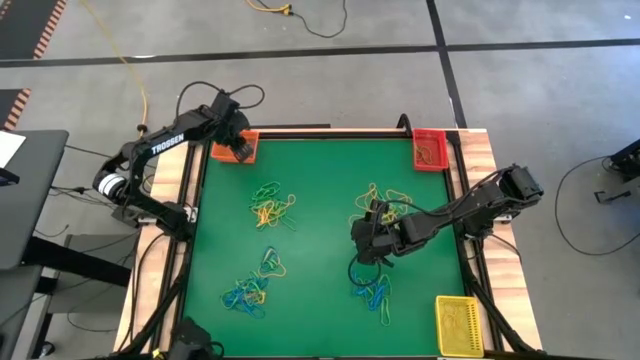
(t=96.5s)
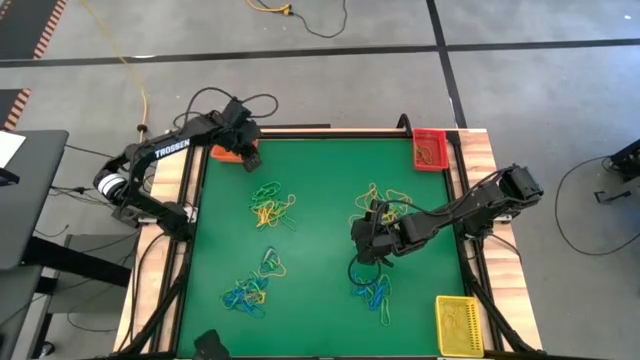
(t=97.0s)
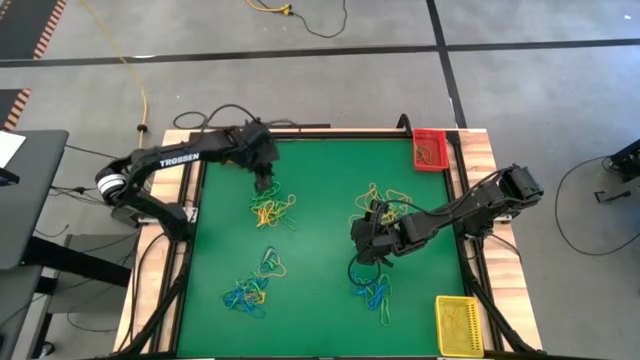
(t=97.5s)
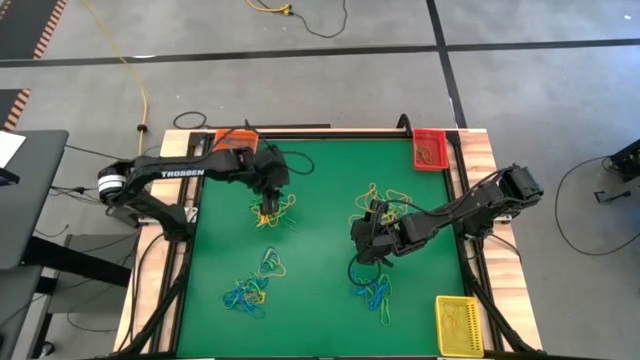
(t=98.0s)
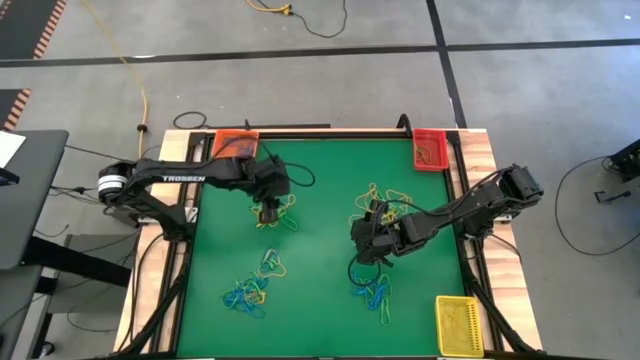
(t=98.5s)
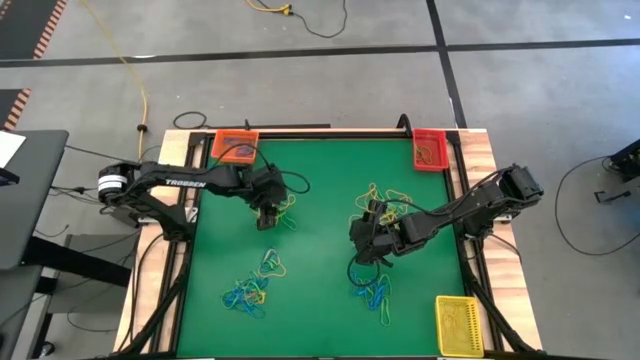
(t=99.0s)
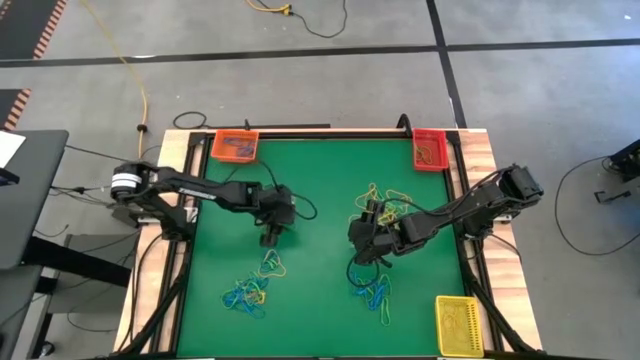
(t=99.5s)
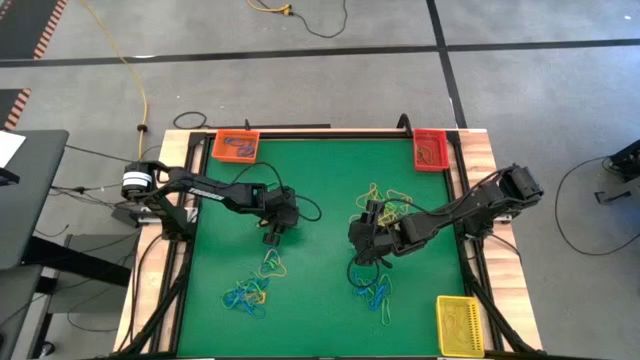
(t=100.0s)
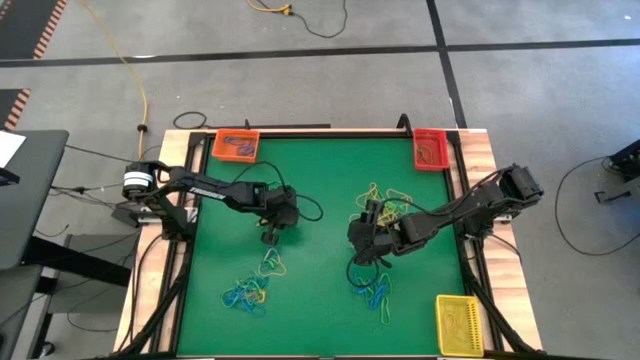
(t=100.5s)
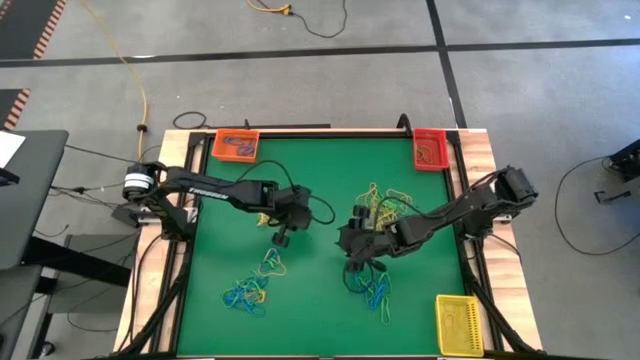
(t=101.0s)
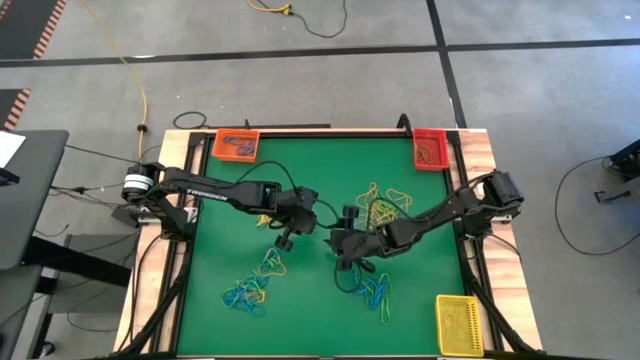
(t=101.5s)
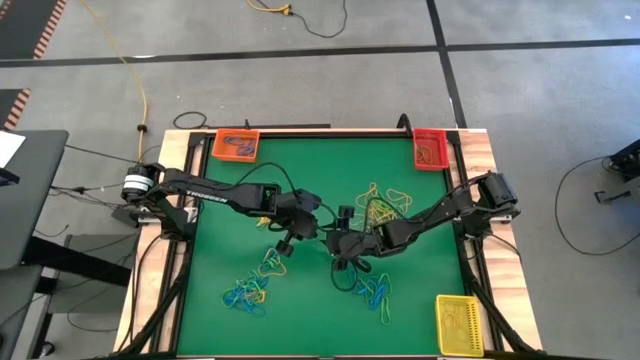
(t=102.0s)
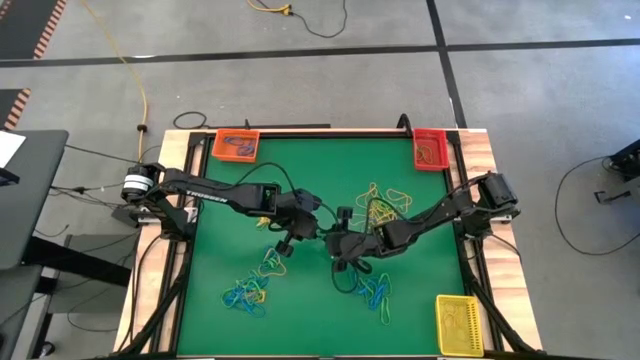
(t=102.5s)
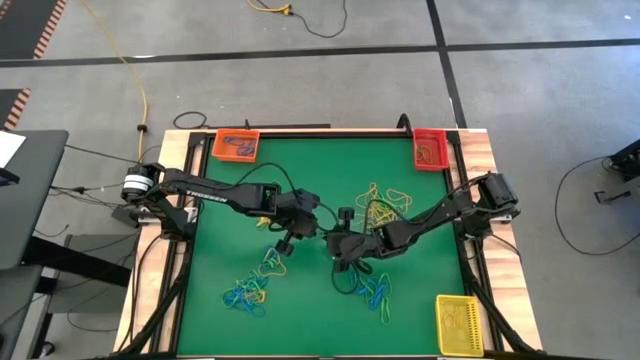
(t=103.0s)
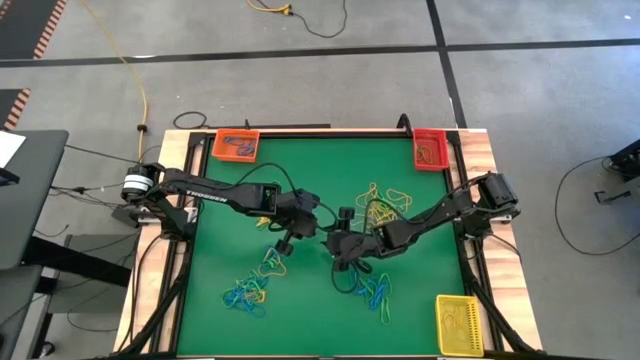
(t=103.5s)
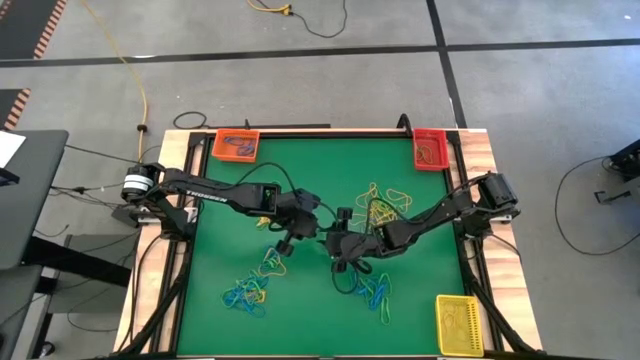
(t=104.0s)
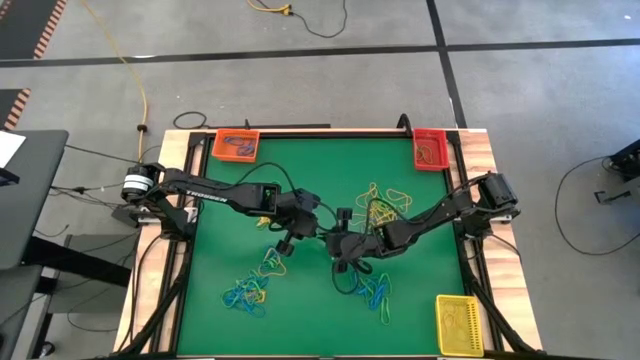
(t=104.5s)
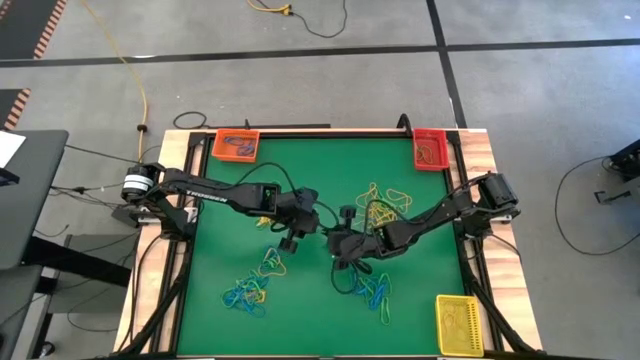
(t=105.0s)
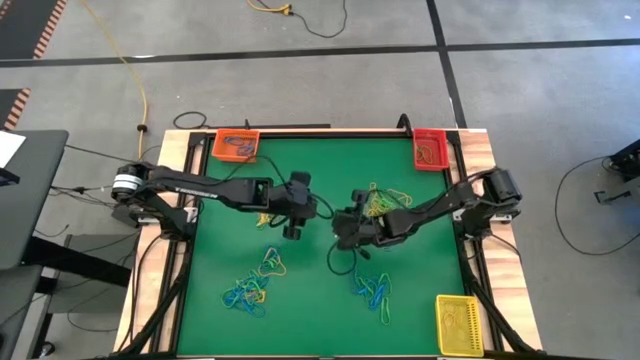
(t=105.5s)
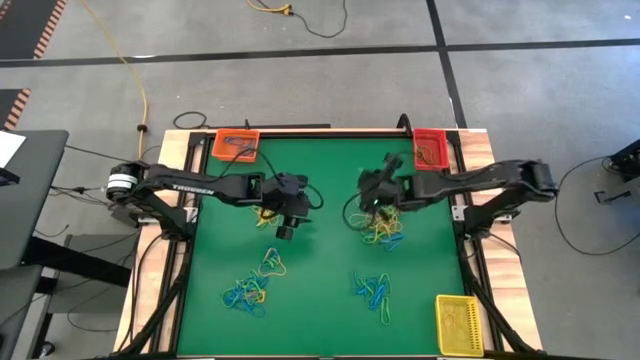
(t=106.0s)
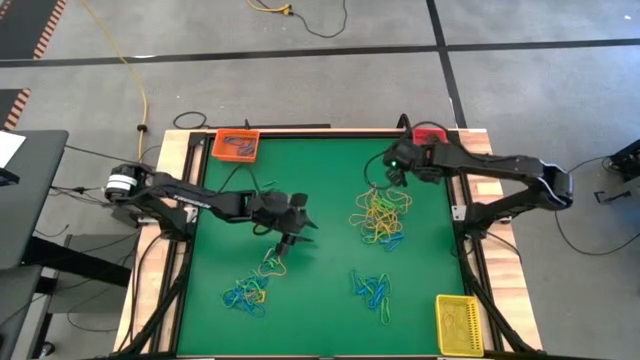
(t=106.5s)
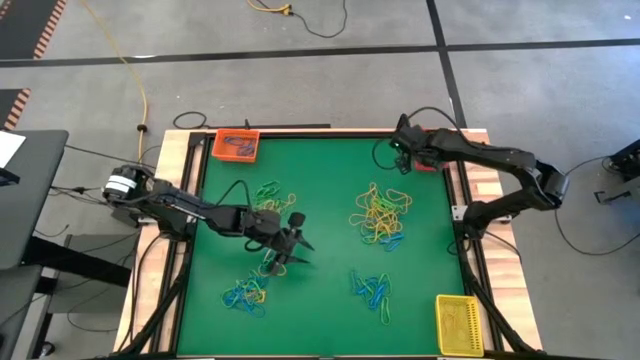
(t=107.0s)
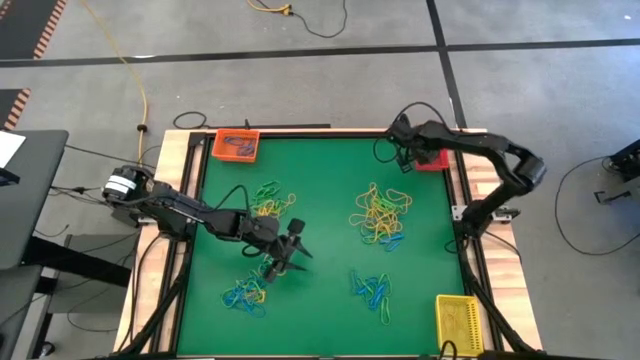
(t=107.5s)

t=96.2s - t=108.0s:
Task: Sort rubber bands into baskets
Put the top left green rubber band into the red bin

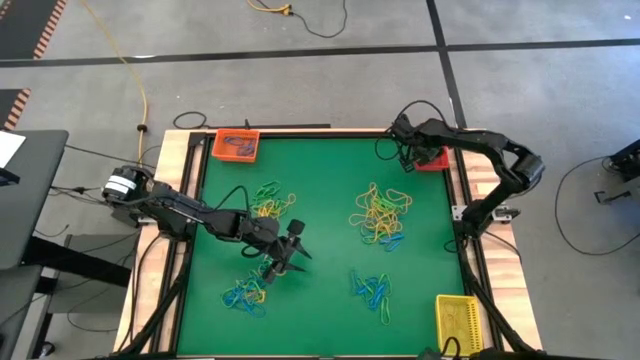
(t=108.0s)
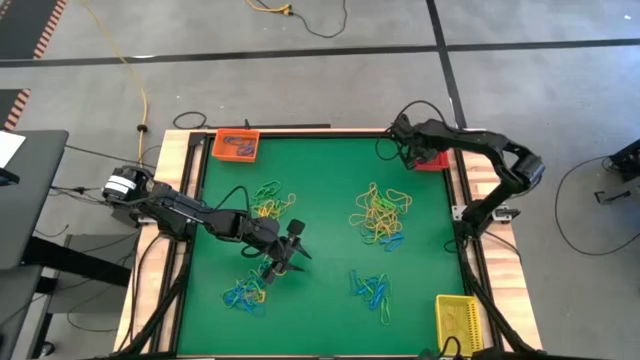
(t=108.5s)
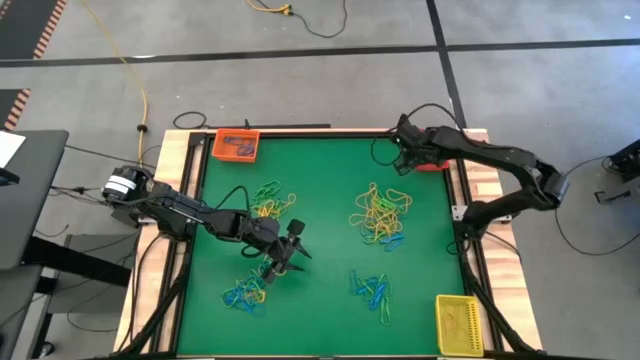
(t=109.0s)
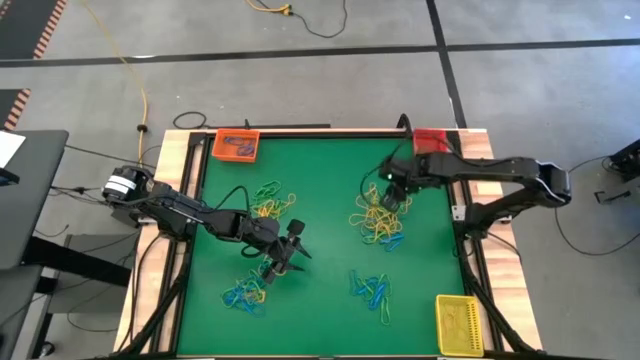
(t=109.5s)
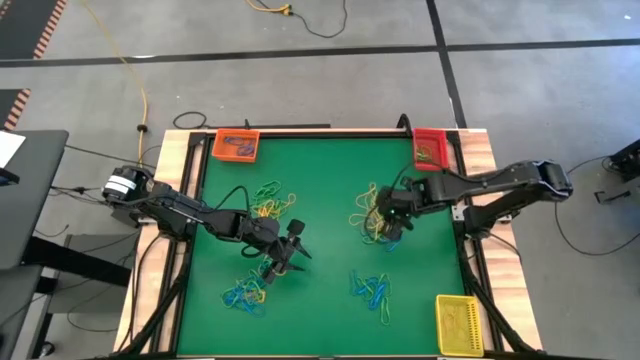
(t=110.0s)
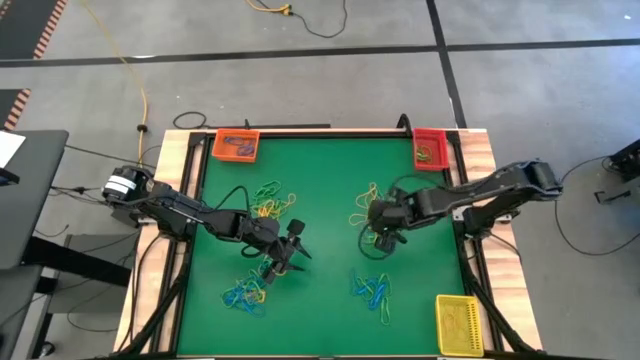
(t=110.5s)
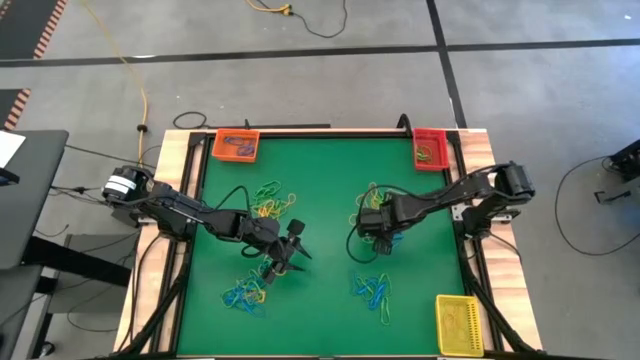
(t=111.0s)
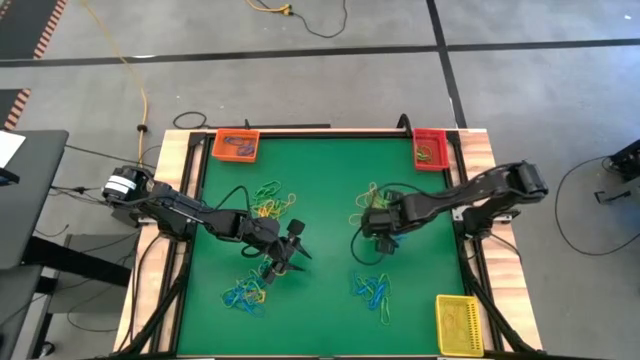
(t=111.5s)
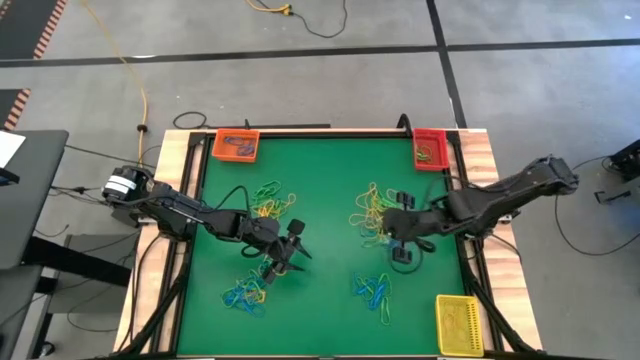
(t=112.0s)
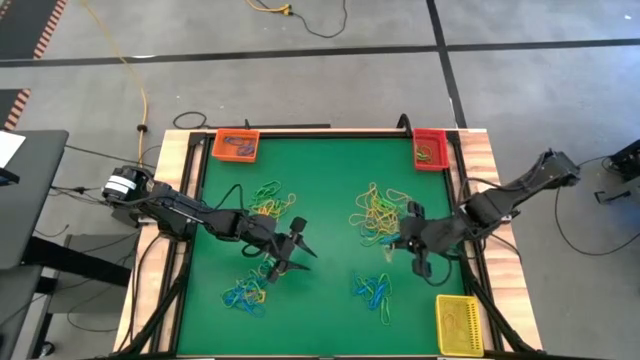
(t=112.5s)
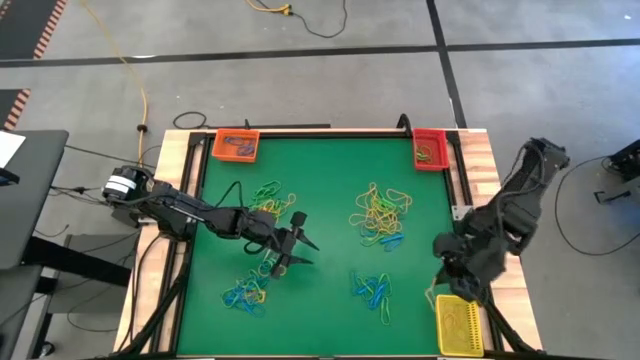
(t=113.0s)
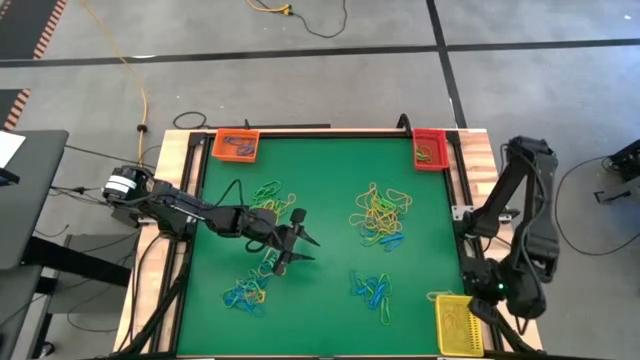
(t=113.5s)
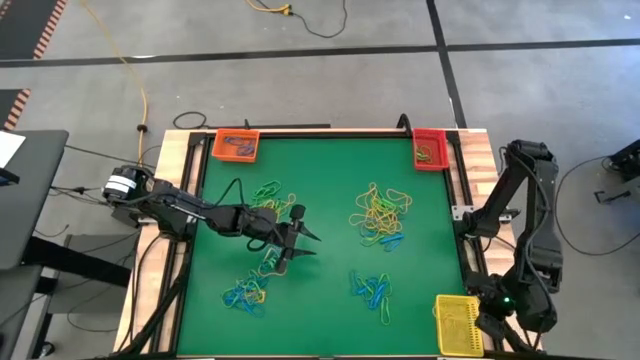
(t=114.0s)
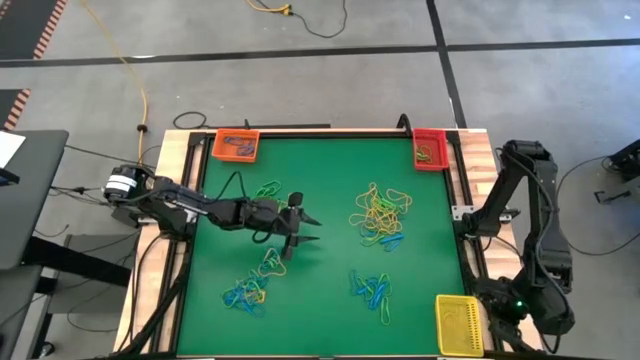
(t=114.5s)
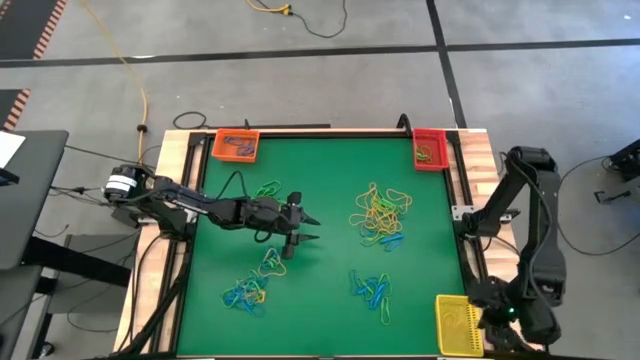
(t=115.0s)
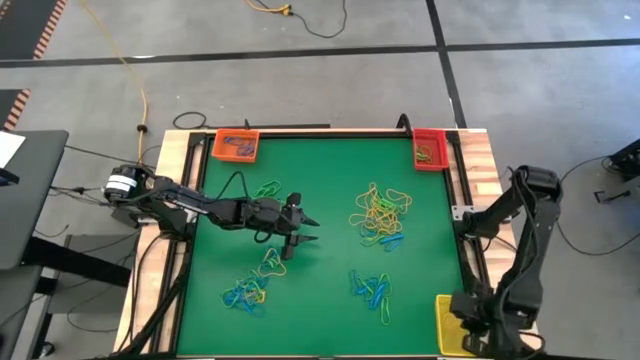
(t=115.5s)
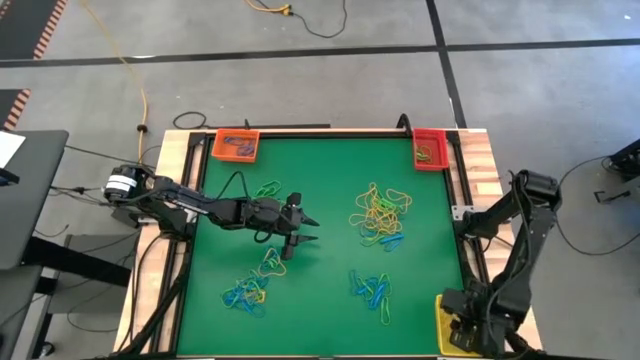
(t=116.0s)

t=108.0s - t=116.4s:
Put the top right yellow rubber band into the yellow bin
